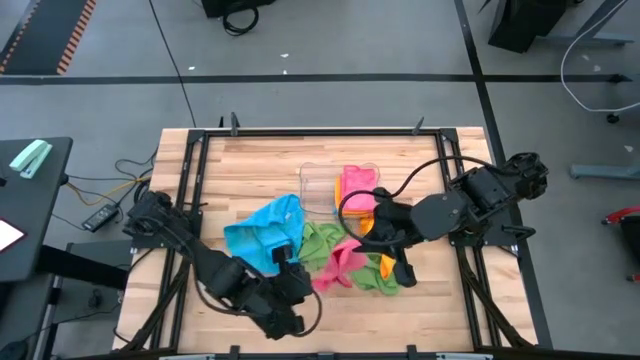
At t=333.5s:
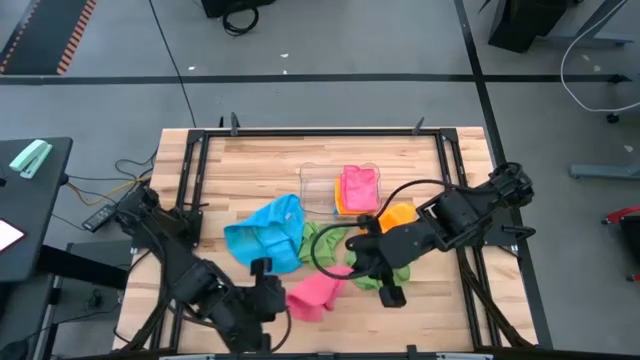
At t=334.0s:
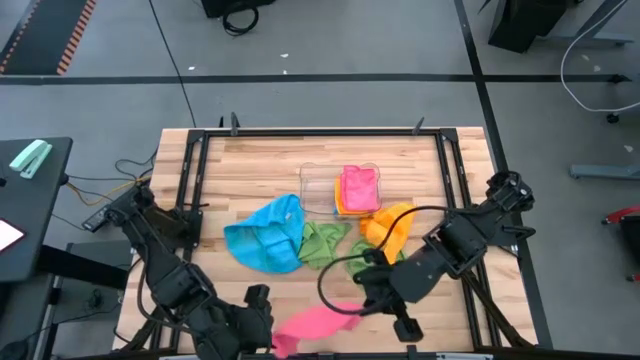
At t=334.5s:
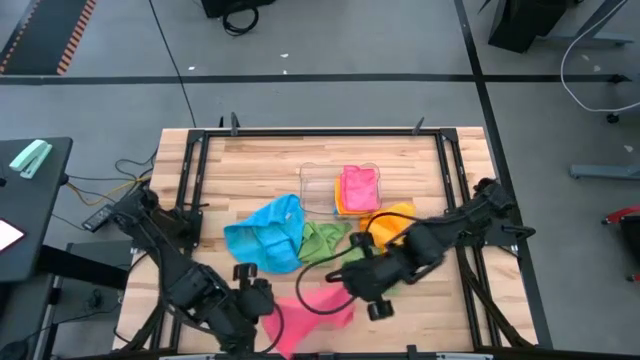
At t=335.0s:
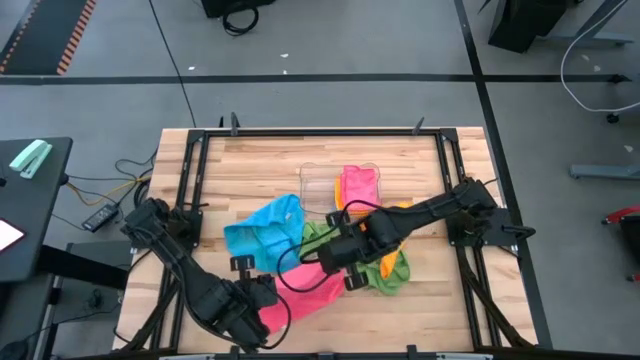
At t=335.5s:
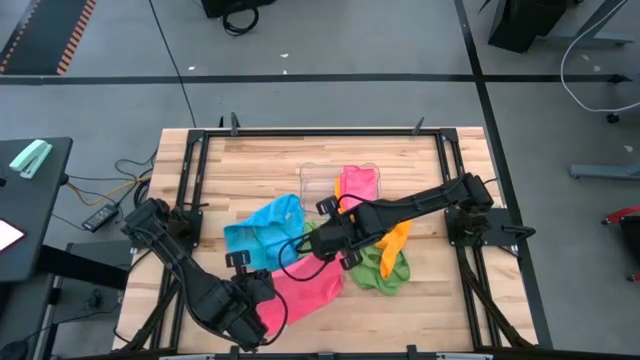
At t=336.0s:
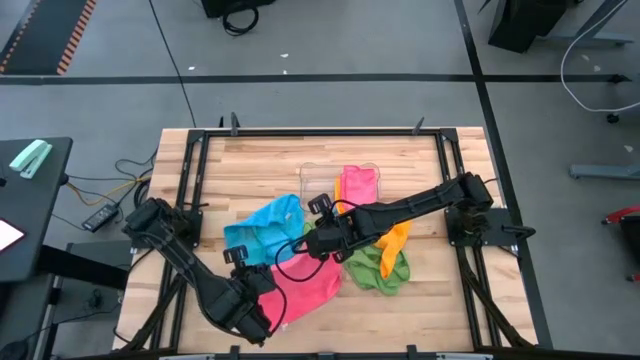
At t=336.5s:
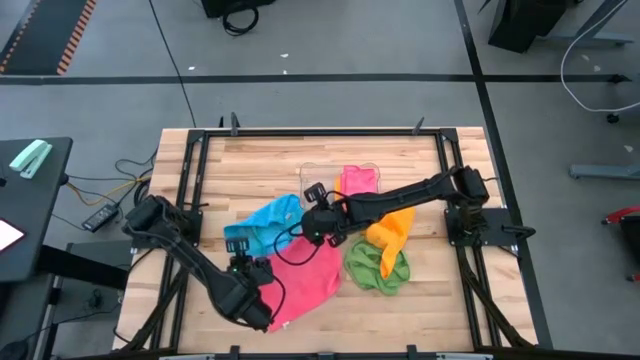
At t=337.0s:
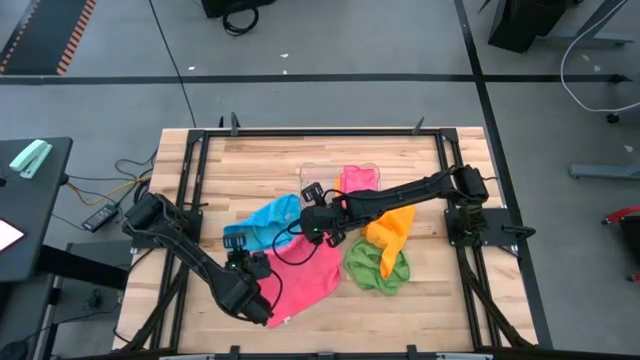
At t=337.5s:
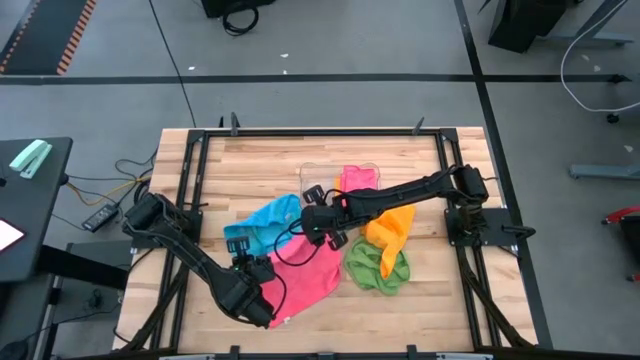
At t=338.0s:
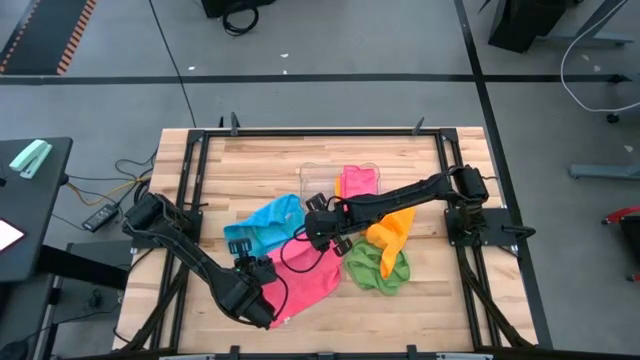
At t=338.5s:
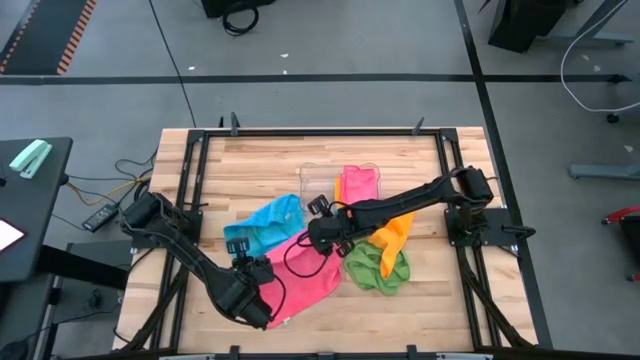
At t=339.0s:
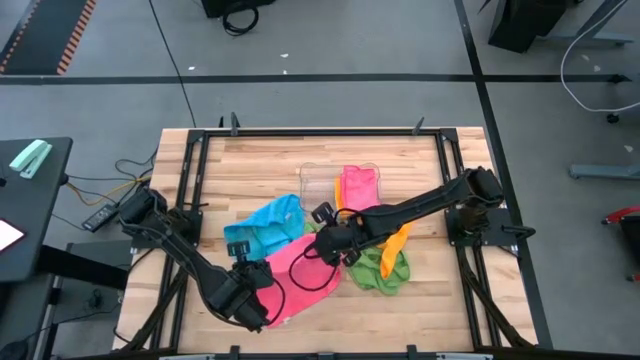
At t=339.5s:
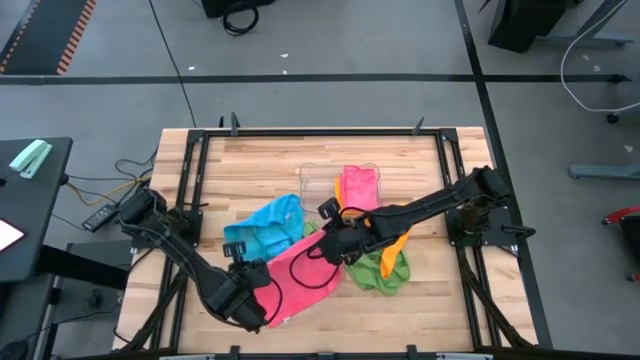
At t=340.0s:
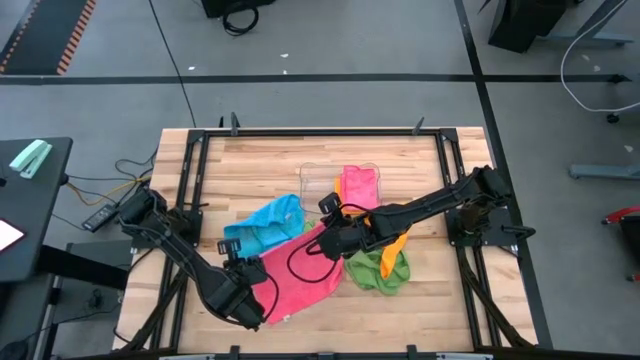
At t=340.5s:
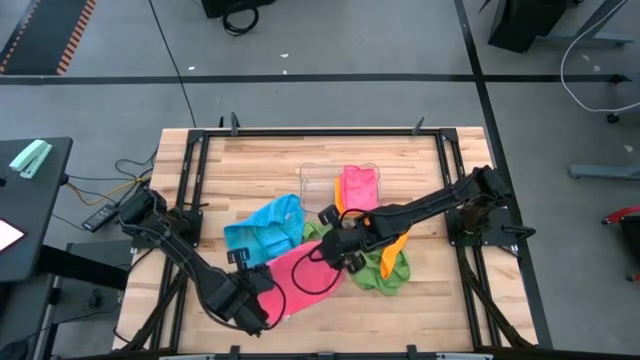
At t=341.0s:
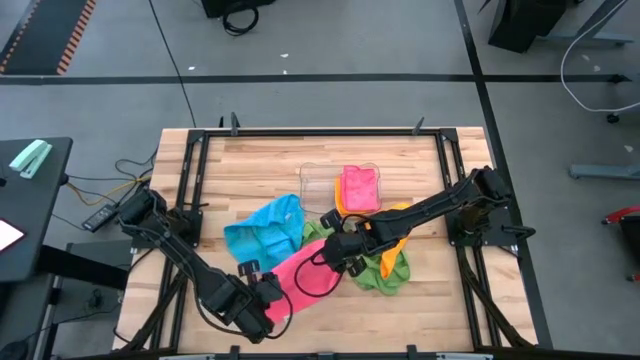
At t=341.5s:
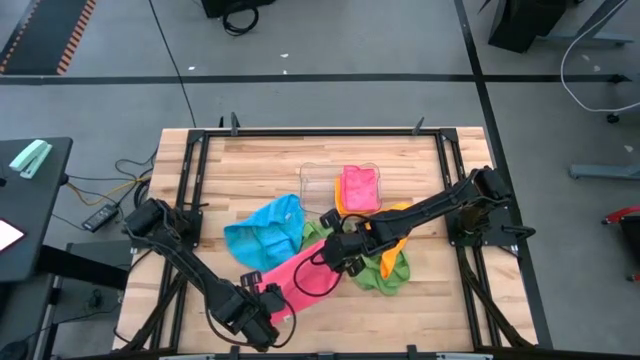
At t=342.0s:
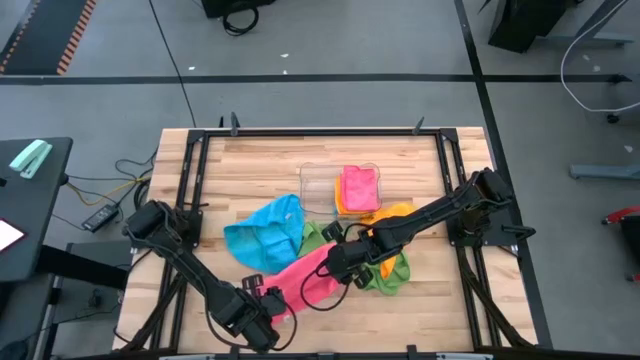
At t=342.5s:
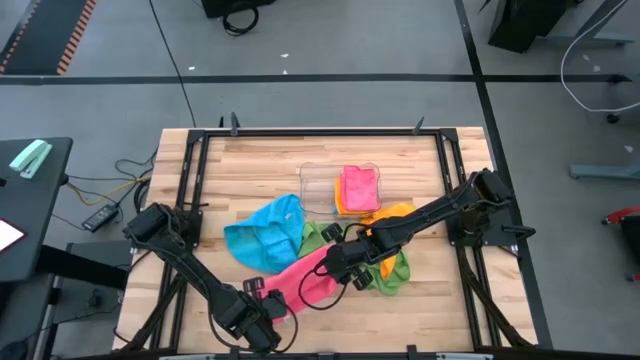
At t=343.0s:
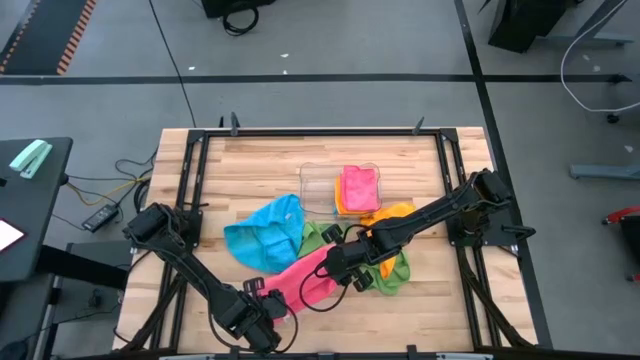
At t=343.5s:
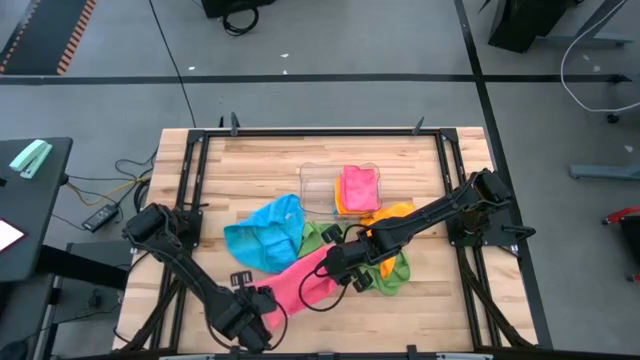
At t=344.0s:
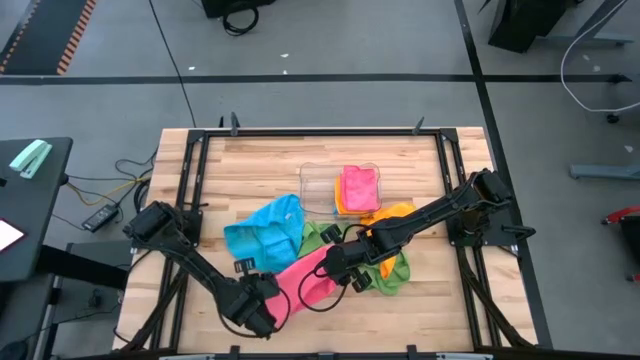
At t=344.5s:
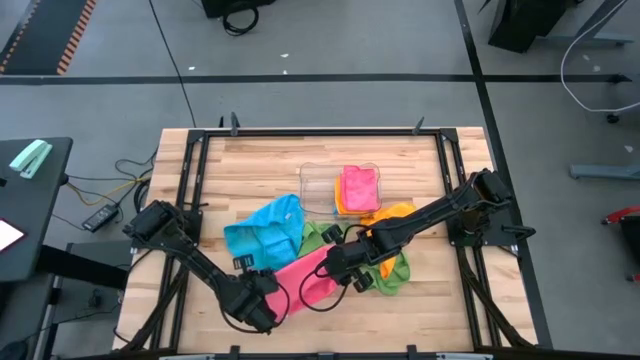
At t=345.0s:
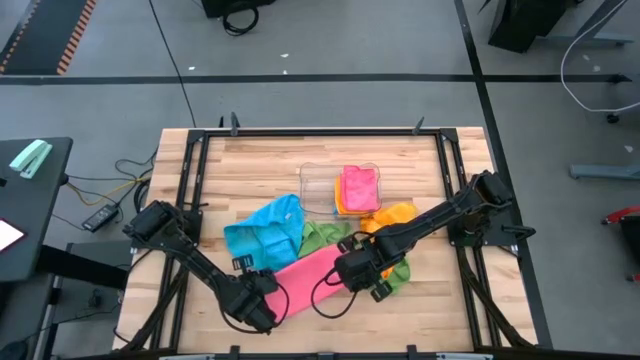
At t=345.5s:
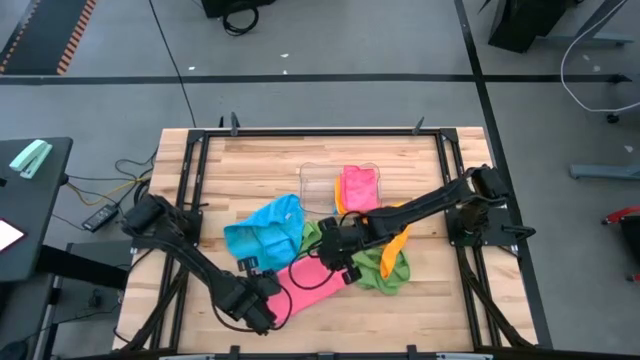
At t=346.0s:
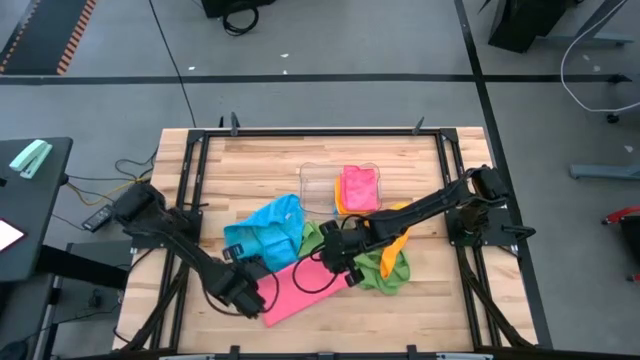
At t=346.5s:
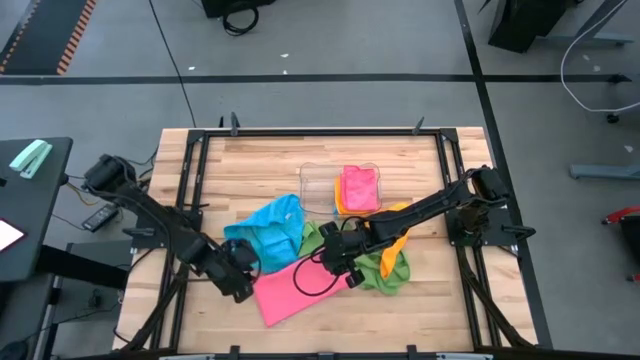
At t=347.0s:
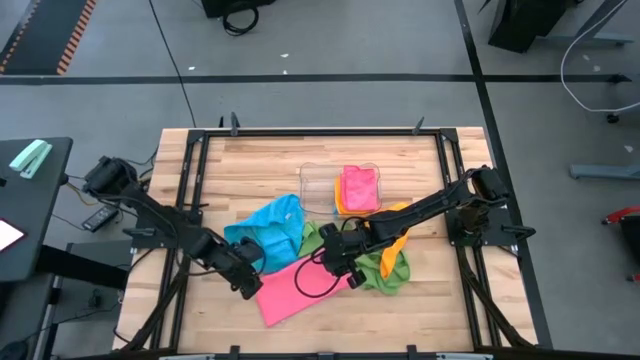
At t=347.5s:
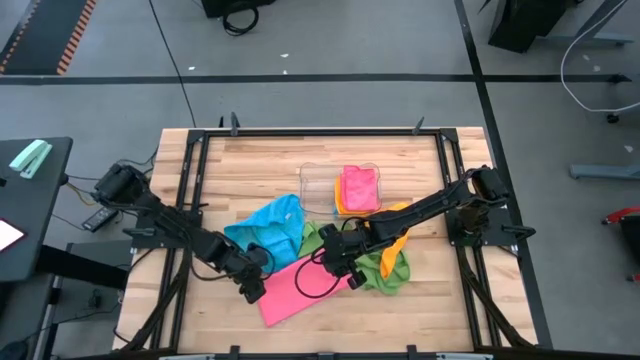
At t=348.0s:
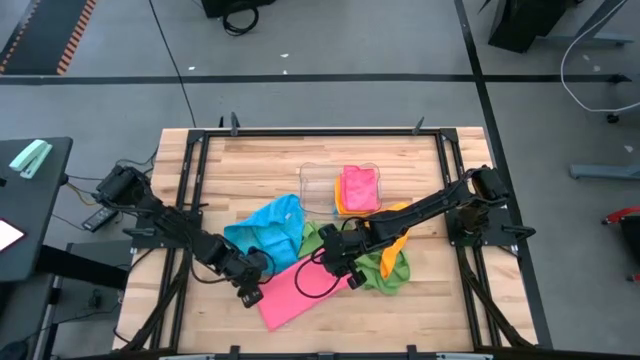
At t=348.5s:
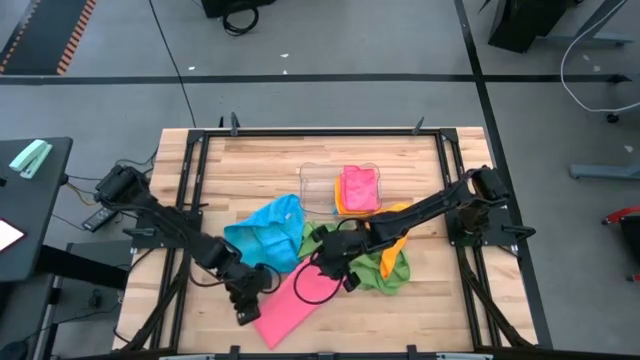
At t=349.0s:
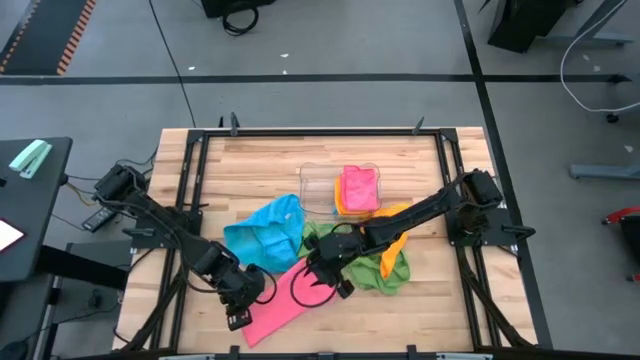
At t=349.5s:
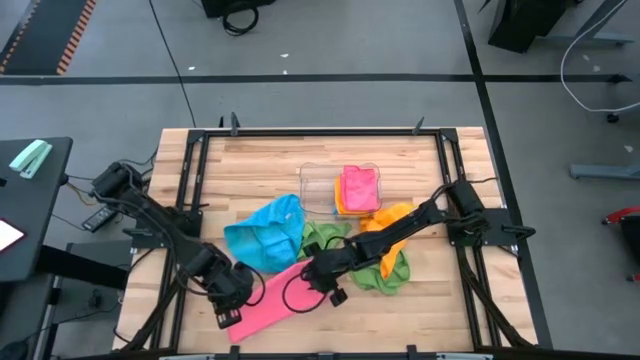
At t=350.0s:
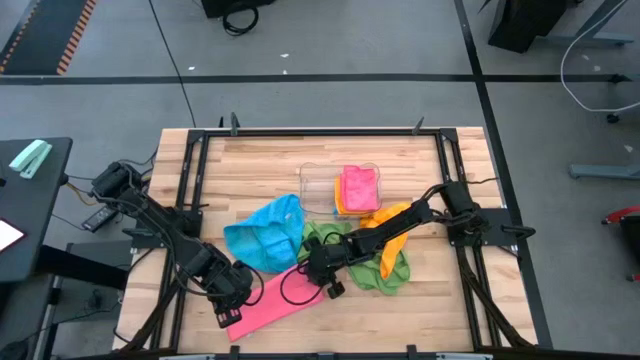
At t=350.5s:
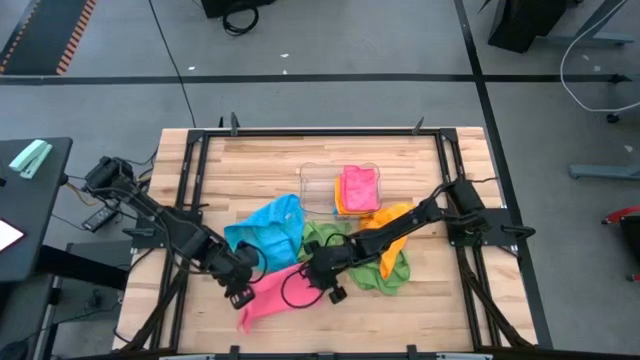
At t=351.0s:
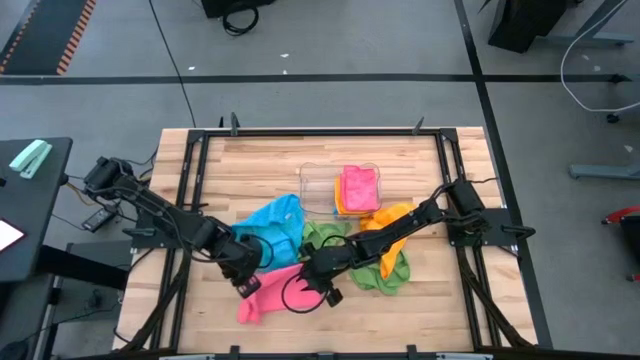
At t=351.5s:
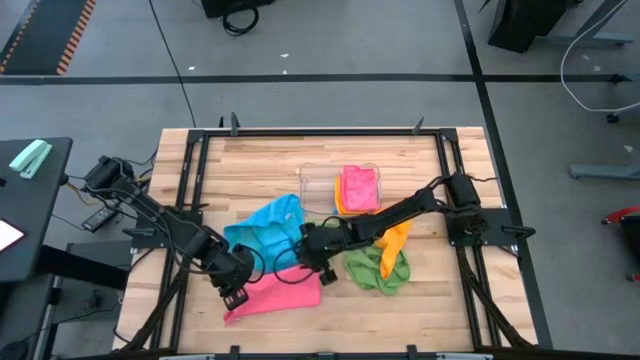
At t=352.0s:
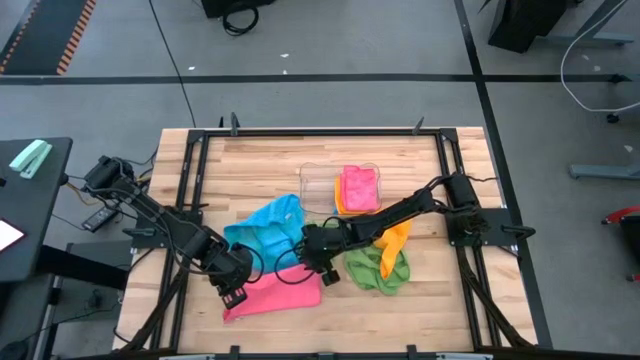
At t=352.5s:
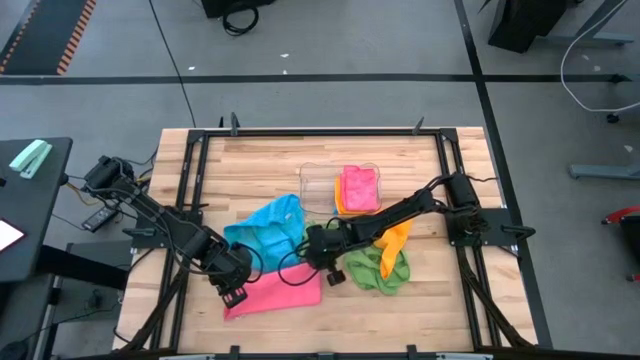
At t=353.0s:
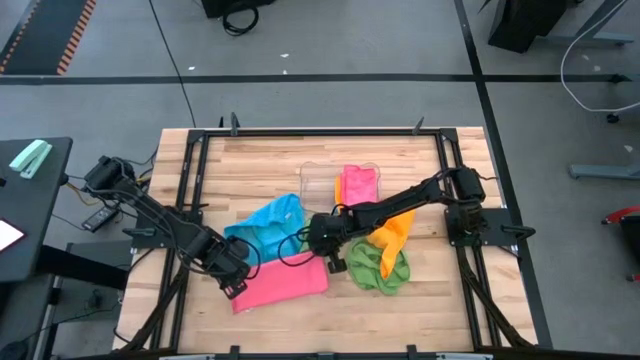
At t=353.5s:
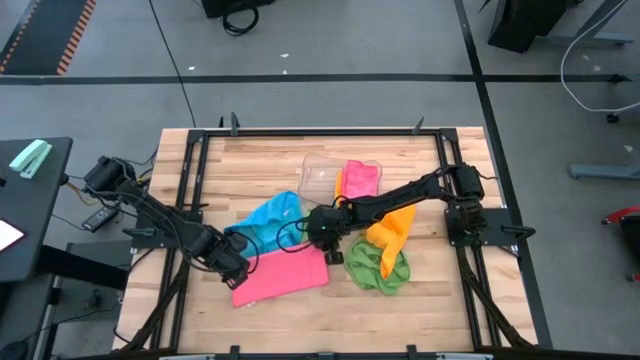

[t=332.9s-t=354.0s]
Task: Fold microfiber towels
Fold the pink microfiber cloth
